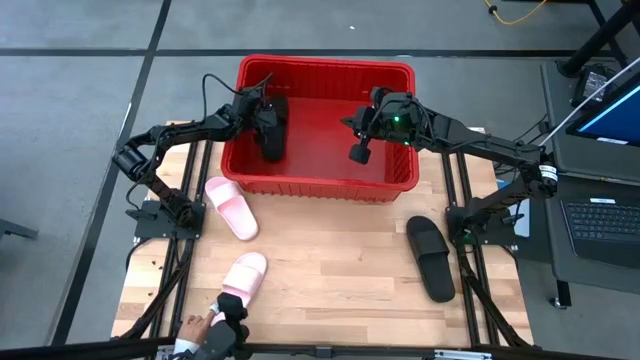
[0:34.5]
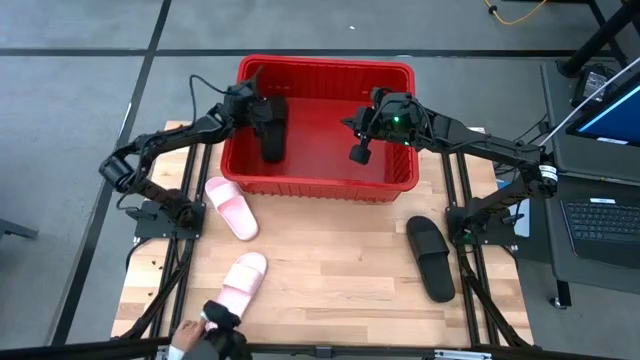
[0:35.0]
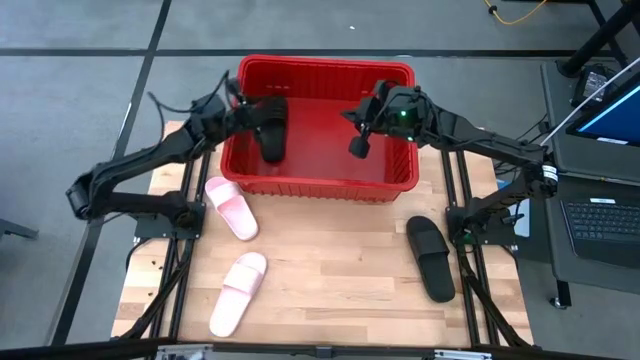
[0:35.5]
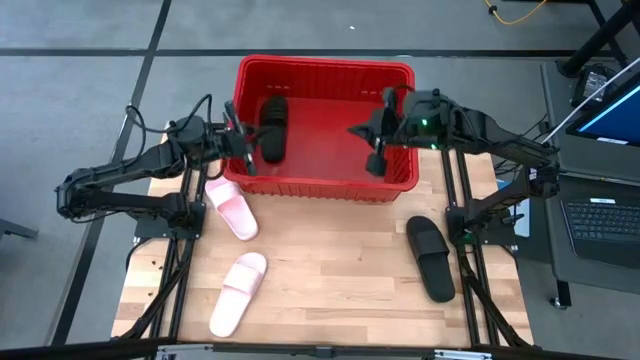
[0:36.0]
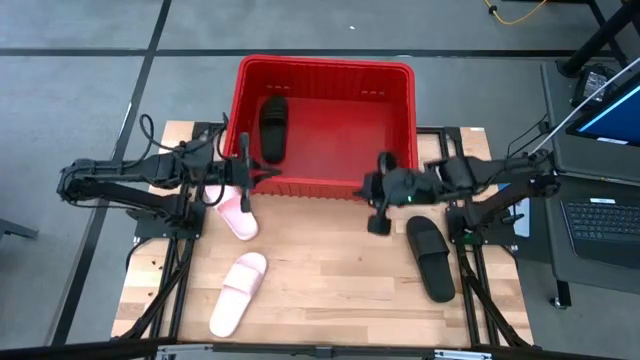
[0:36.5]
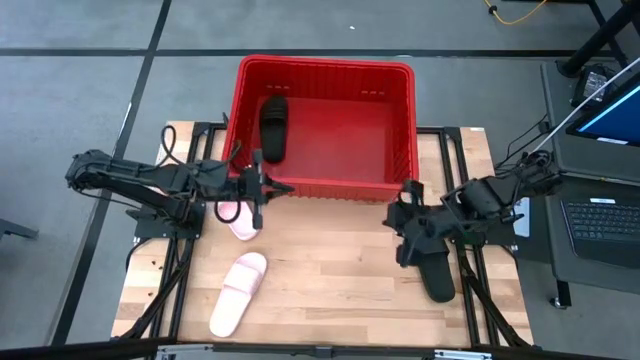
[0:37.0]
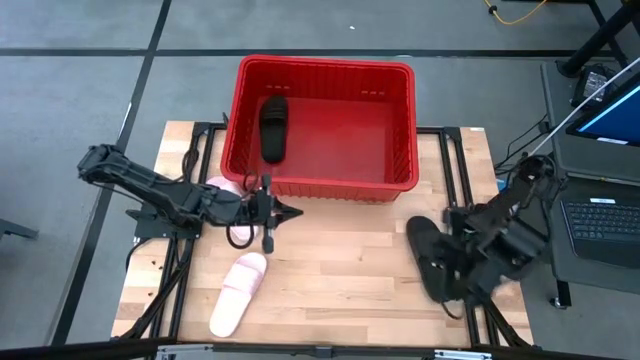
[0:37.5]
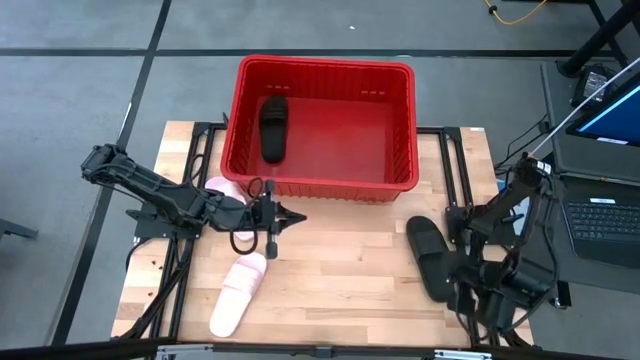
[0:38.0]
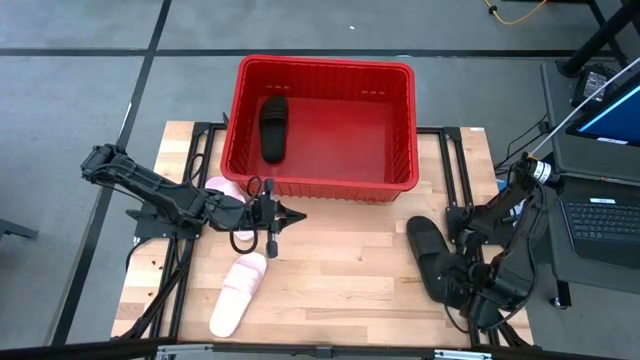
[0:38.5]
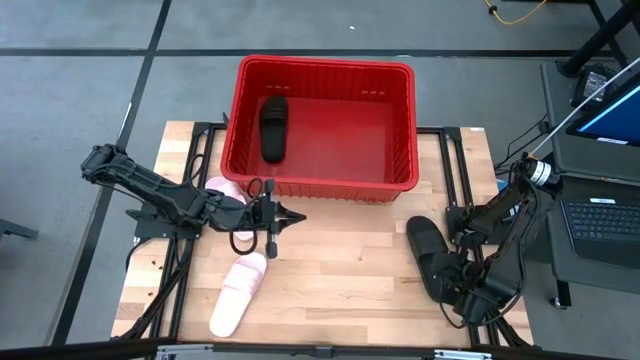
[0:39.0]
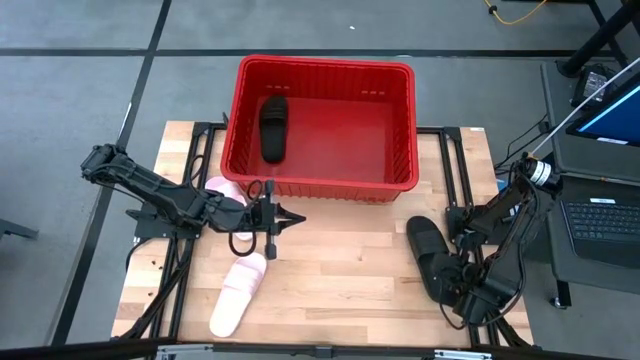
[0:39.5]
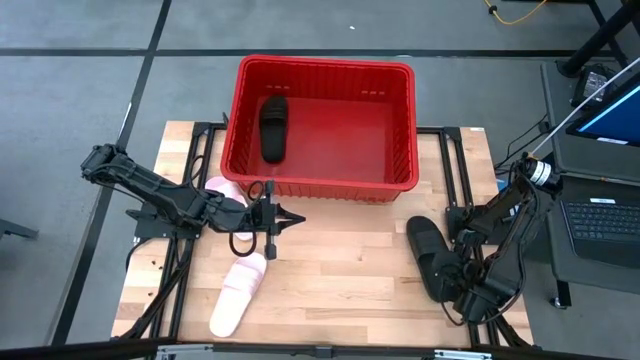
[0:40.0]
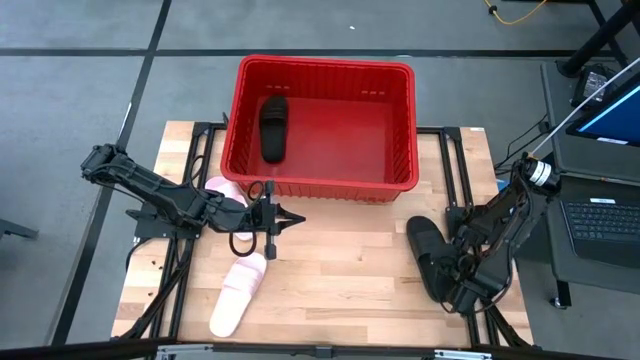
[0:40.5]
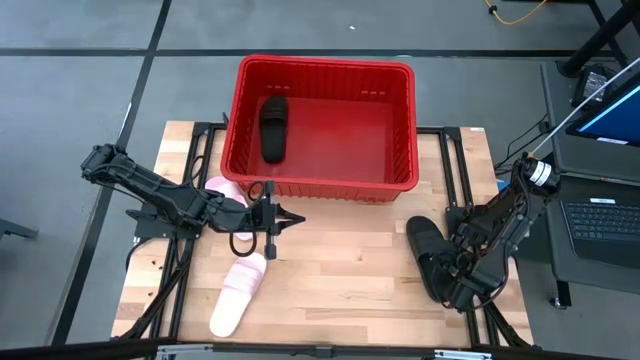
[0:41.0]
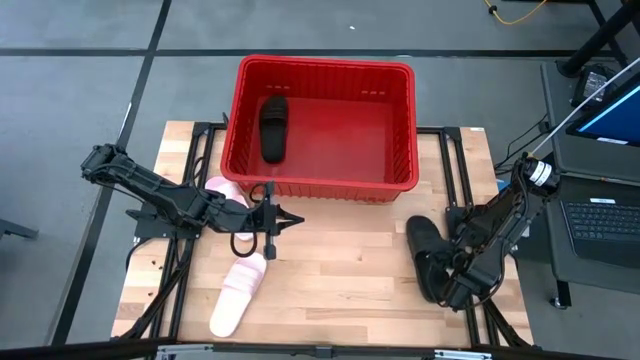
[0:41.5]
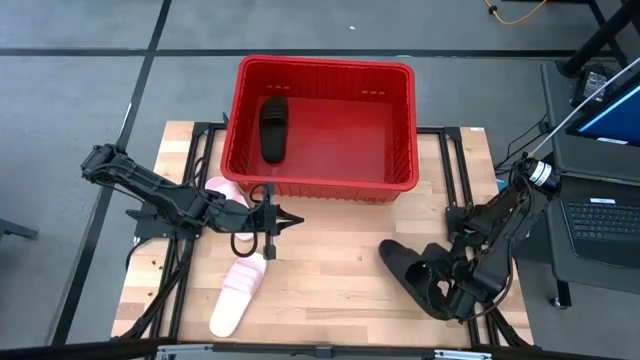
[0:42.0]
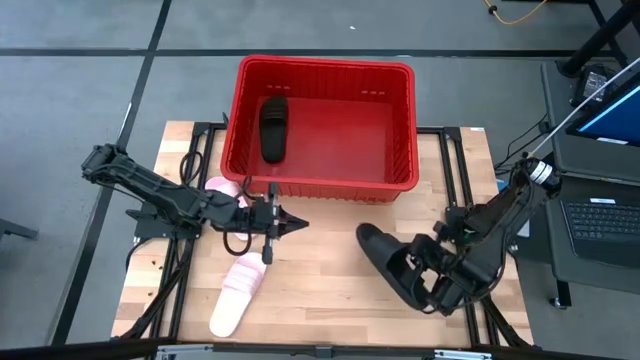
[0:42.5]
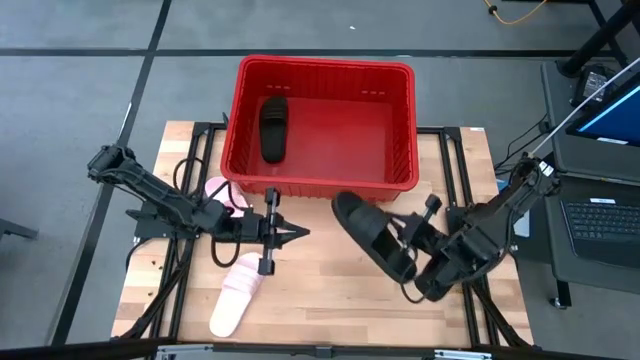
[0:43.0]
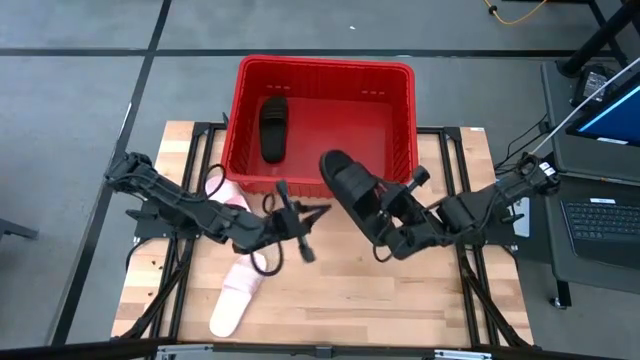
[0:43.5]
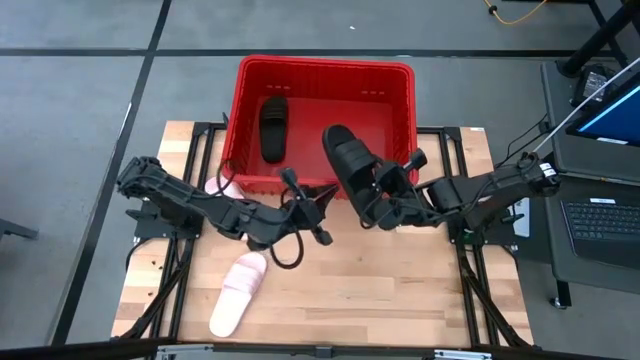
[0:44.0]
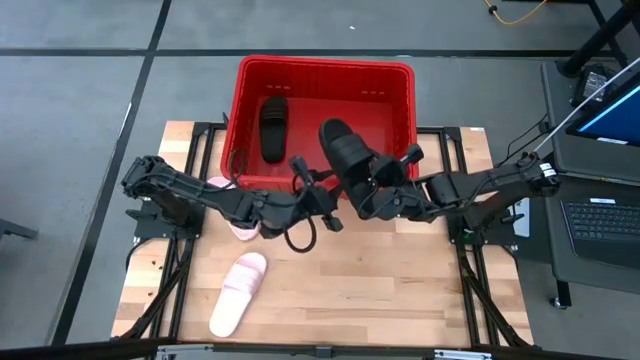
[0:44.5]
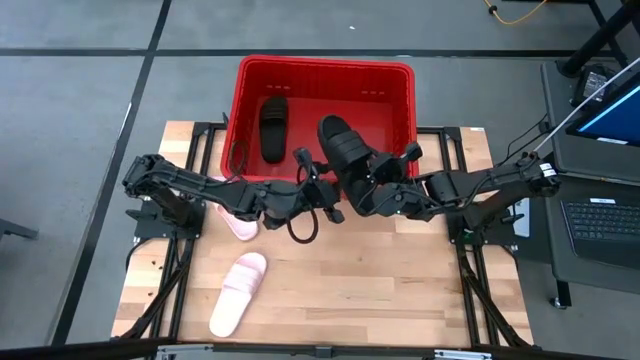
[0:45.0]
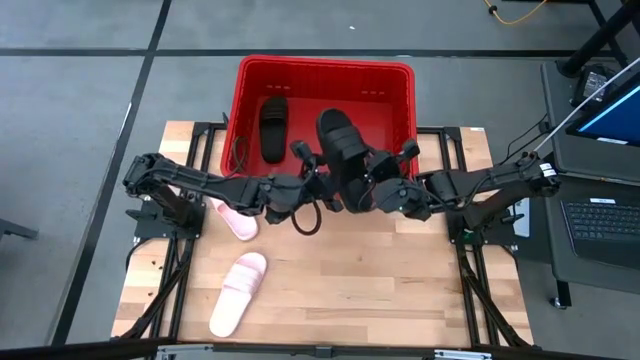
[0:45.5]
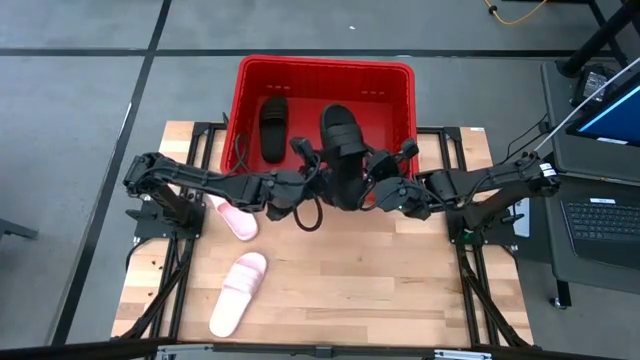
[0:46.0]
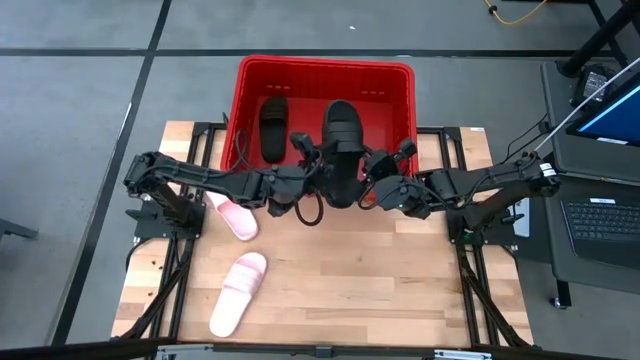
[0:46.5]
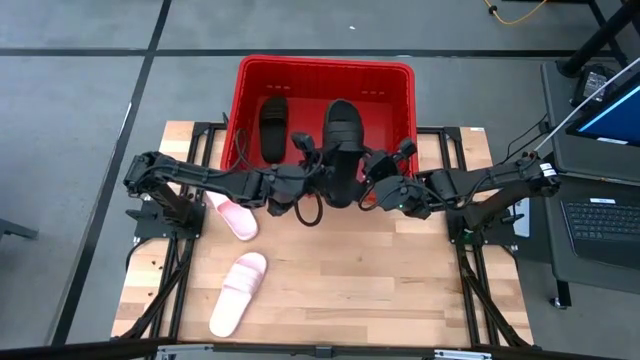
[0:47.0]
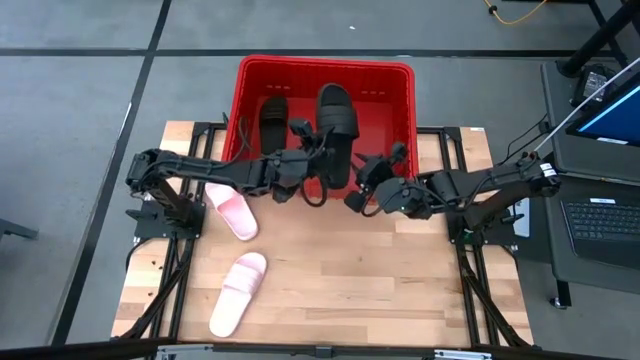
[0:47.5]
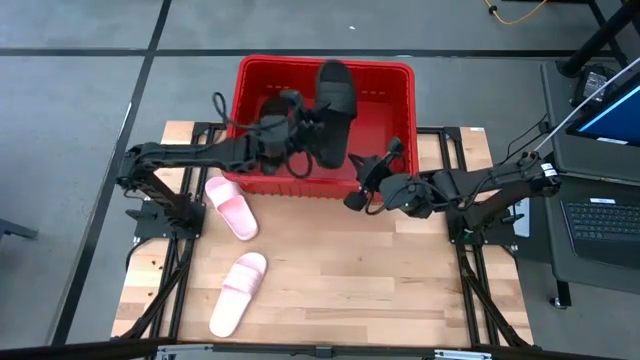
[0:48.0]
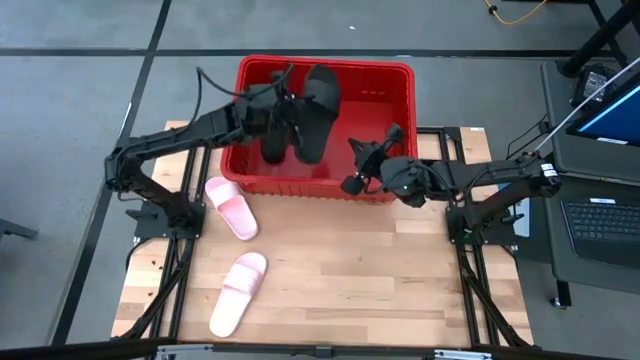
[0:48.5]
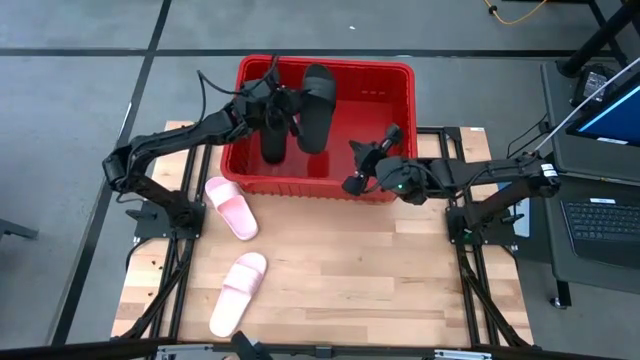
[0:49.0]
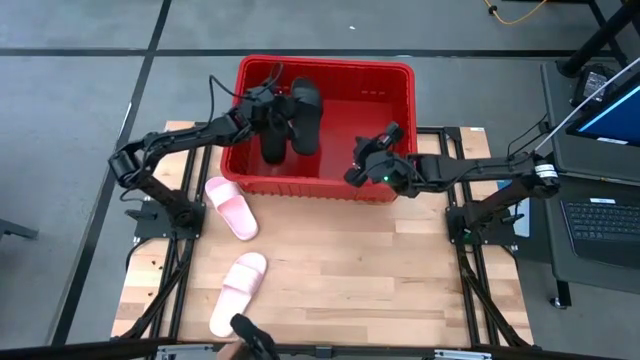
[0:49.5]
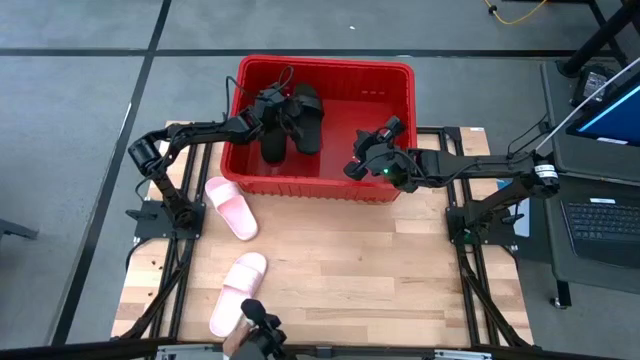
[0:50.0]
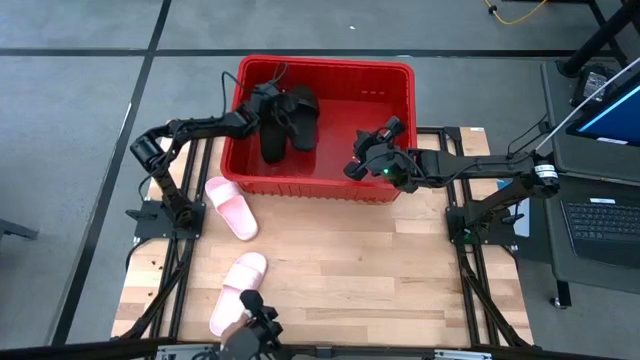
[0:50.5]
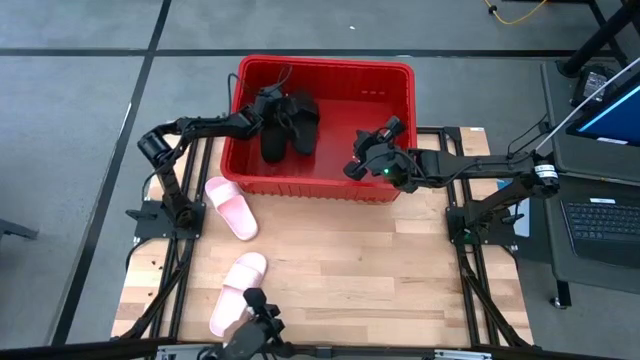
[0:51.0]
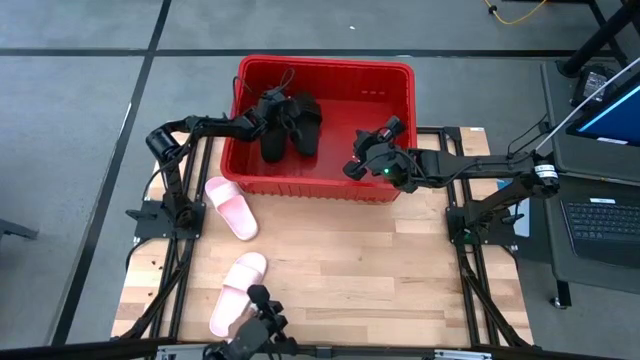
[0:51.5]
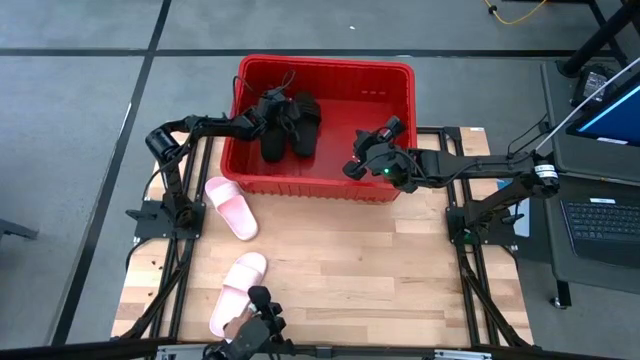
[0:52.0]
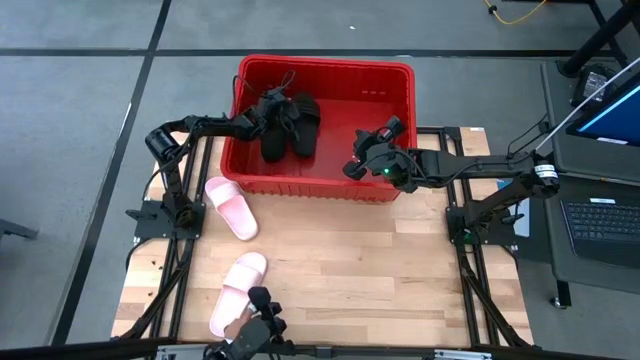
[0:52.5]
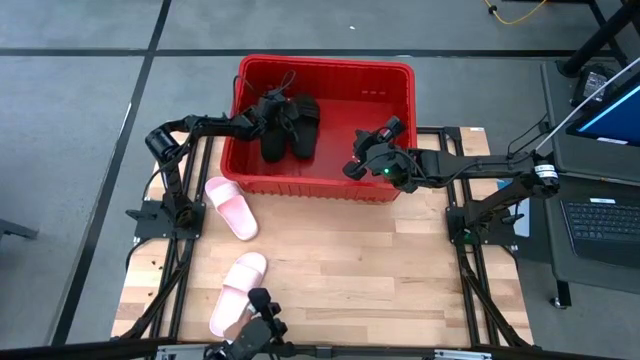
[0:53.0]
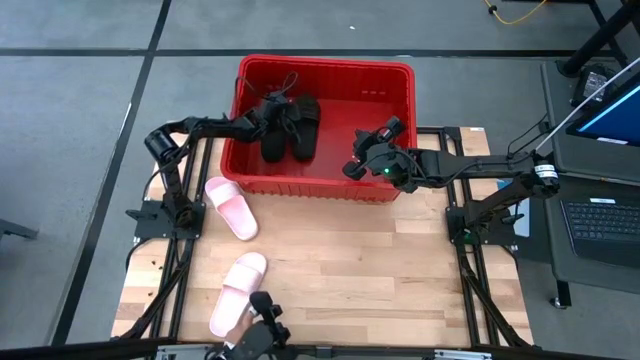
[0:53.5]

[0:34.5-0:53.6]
Task: Pick and place slides into bin
Put the black slide into the red bin

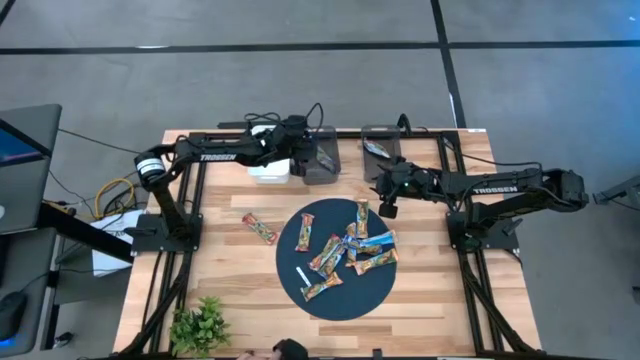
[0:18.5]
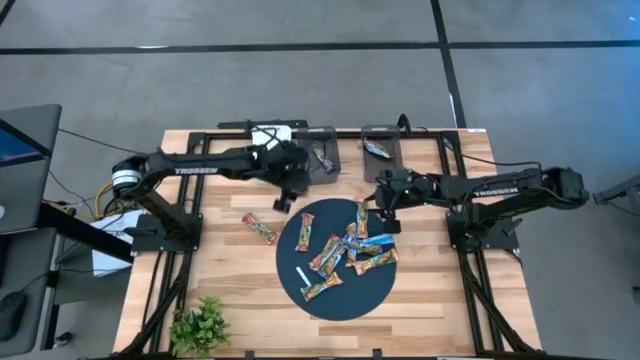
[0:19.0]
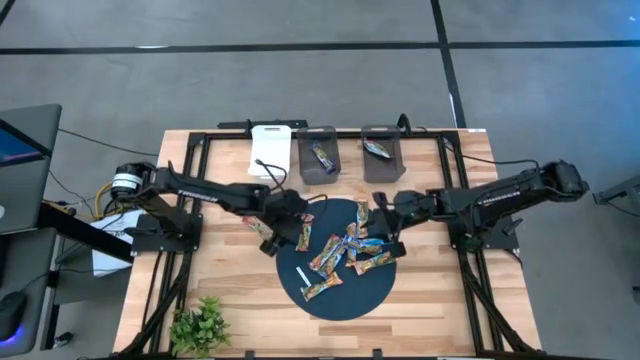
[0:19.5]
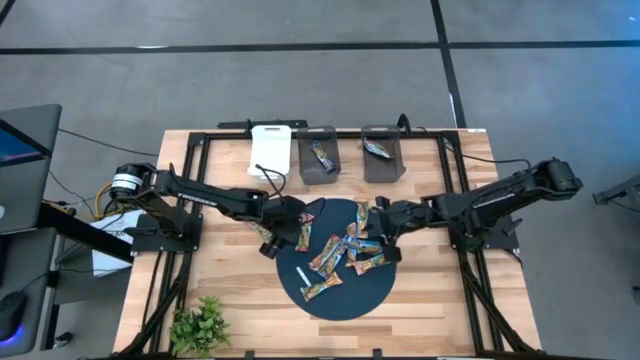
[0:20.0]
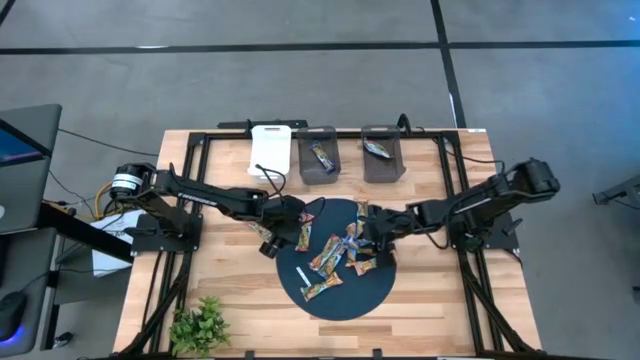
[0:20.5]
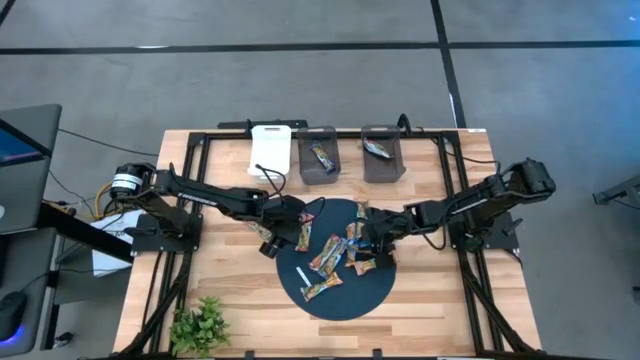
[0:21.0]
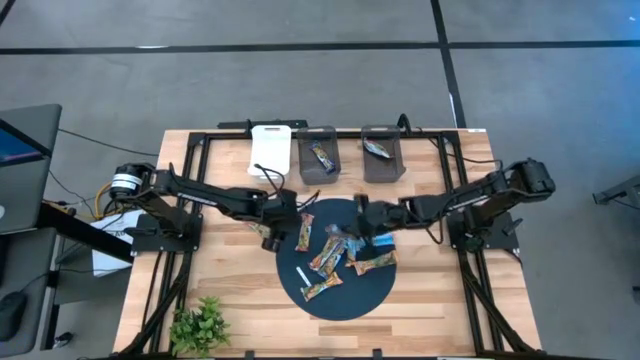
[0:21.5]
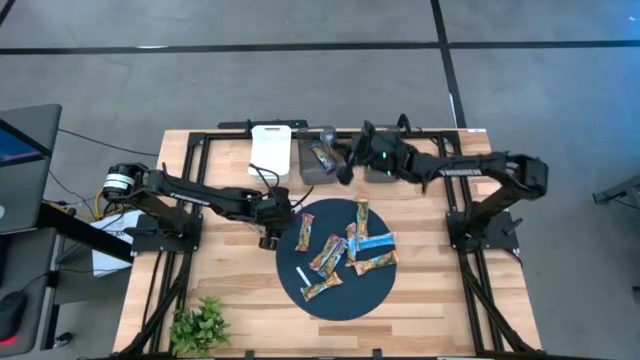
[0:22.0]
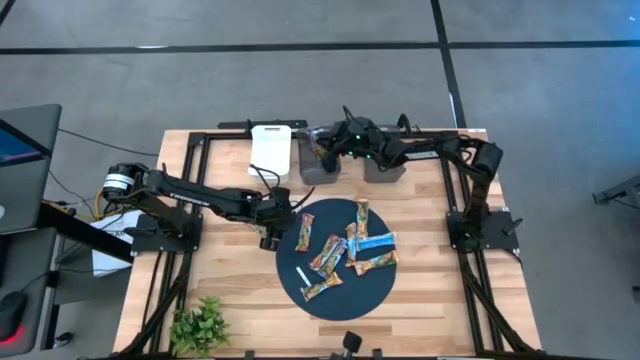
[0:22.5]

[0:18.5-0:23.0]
Task: Pick and place Granola Bars by type
Put the right blue granola bar into the left black bin
